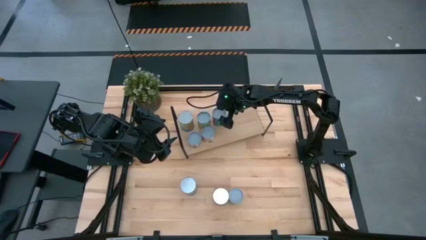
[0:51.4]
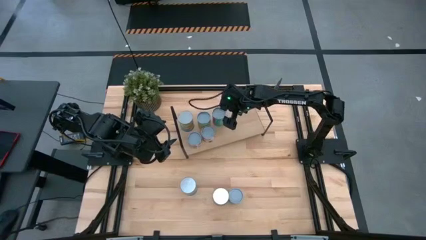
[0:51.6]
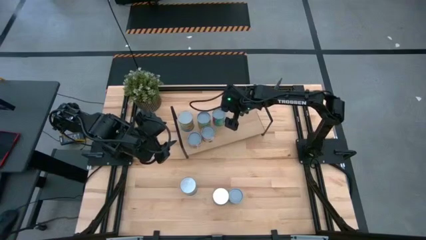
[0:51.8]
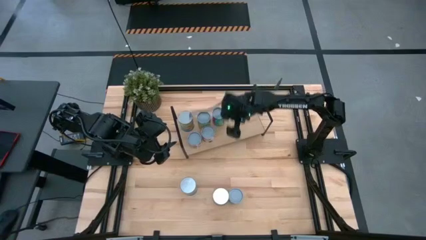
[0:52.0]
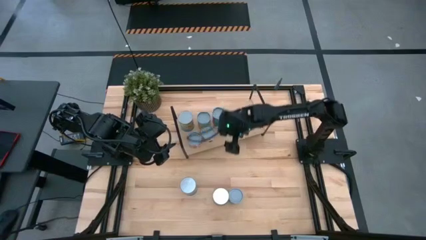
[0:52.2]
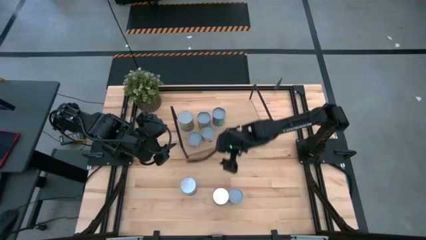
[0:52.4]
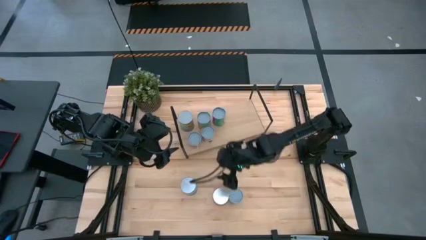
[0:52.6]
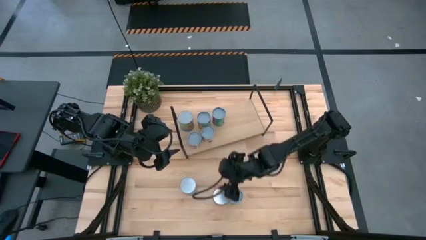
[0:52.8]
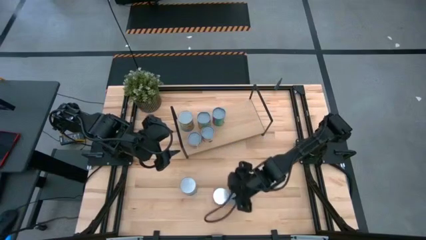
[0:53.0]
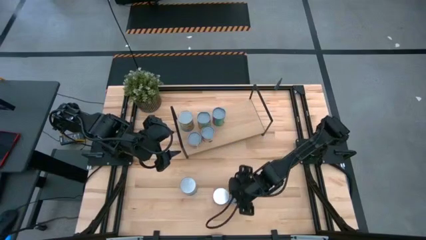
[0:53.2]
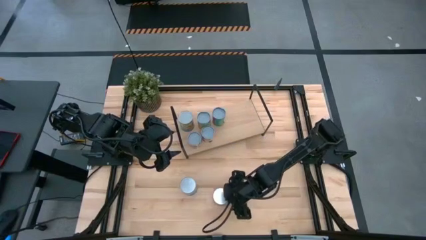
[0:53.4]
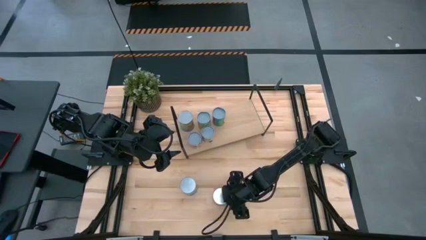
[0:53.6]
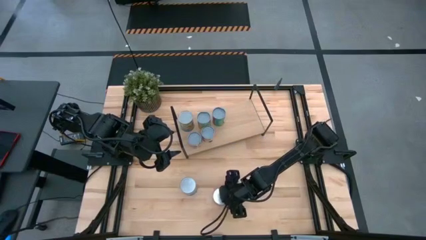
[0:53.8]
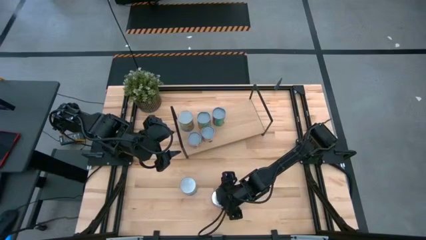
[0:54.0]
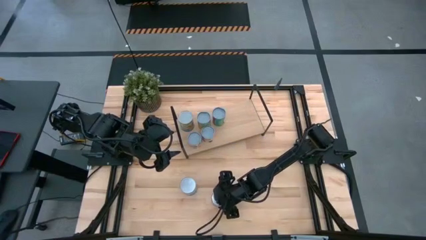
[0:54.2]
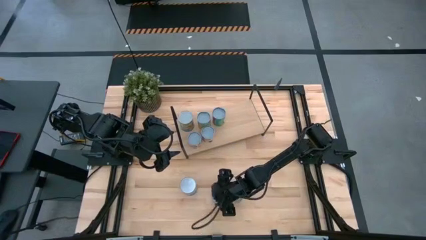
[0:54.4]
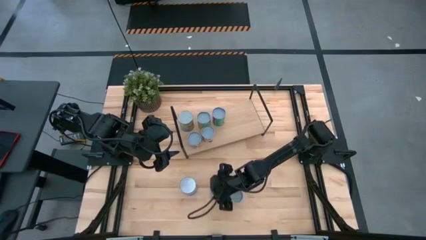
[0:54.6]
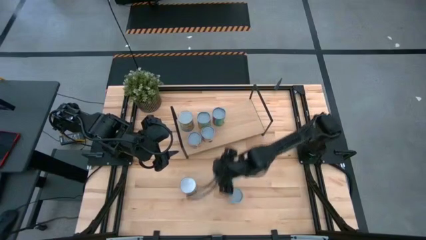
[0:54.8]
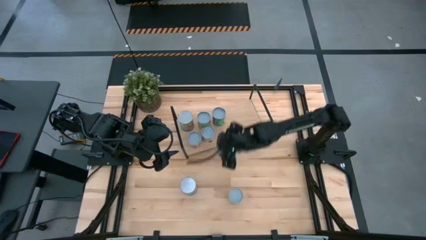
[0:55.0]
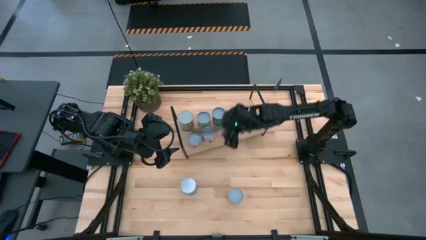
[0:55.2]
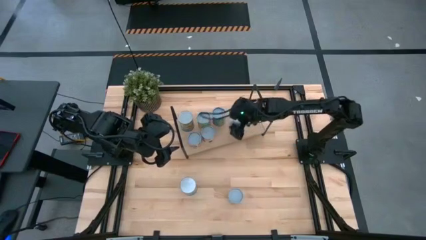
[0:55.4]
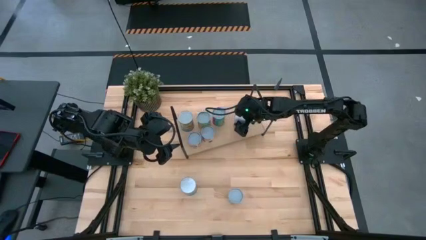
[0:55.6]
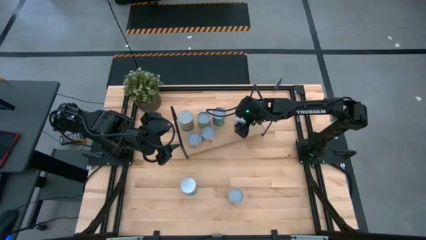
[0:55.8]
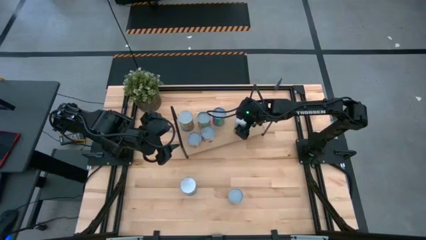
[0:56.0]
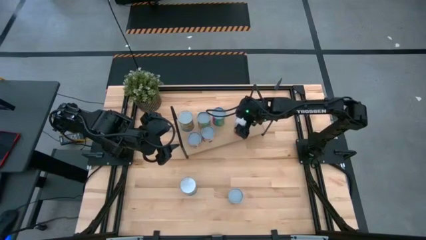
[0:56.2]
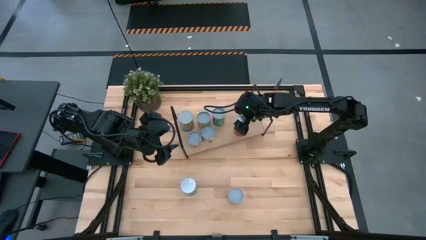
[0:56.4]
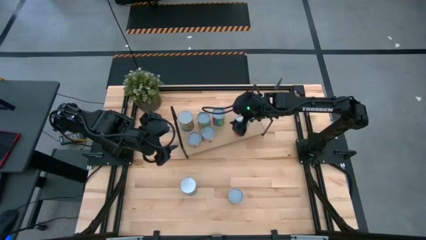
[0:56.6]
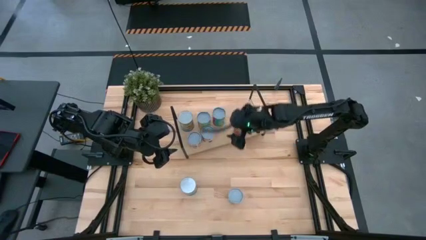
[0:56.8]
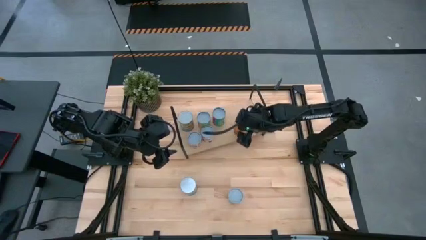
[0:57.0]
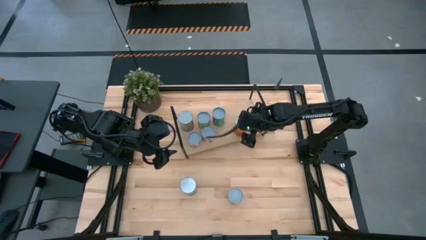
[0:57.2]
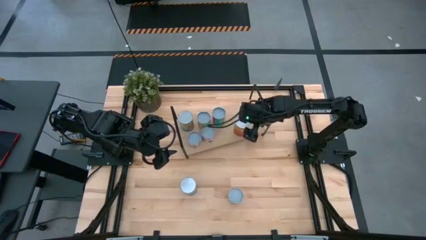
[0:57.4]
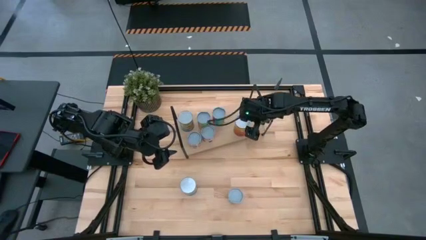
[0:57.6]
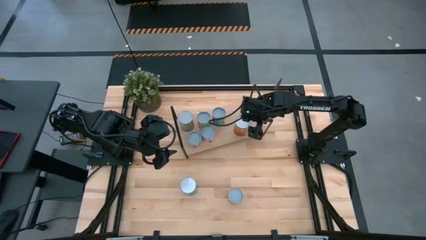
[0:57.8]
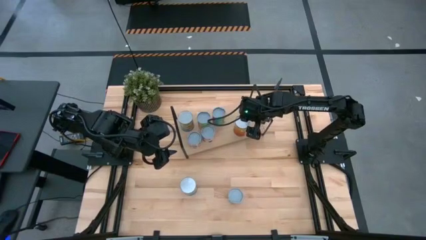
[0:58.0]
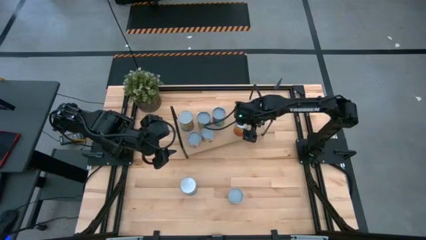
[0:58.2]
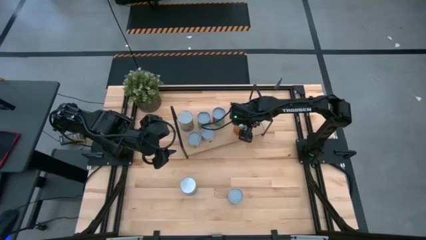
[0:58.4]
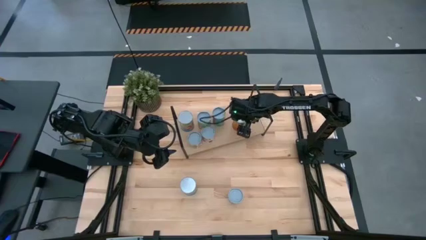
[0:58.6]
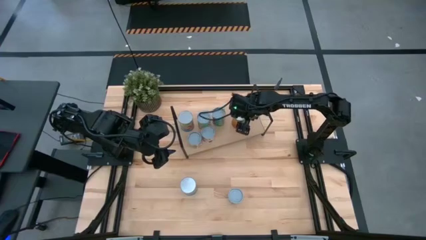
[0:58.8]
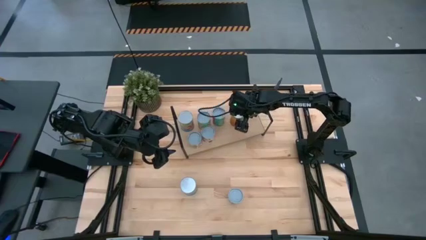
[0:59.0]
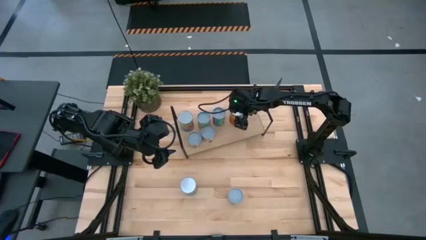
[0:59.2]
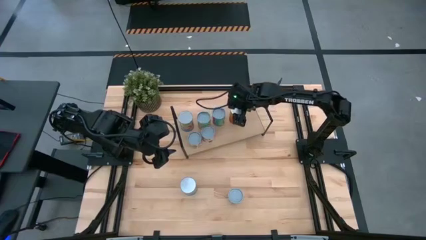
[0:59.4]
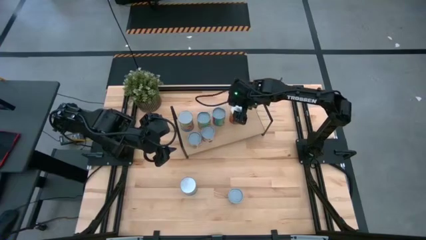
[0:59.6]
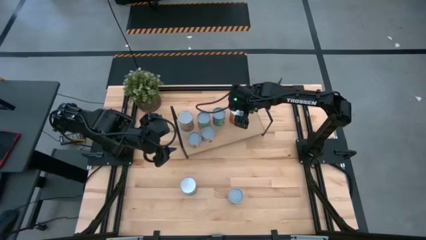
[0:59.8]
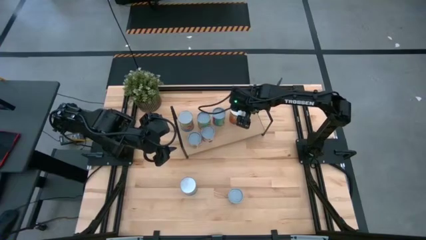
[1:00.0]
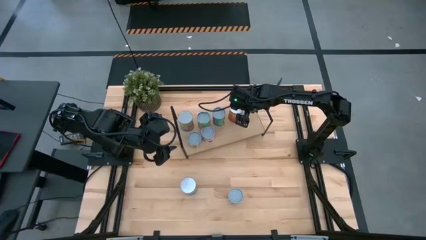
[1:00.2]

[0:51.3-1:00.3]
Task: Pick and place cans onto a shelf
Put the canned pineapple on the shelf
